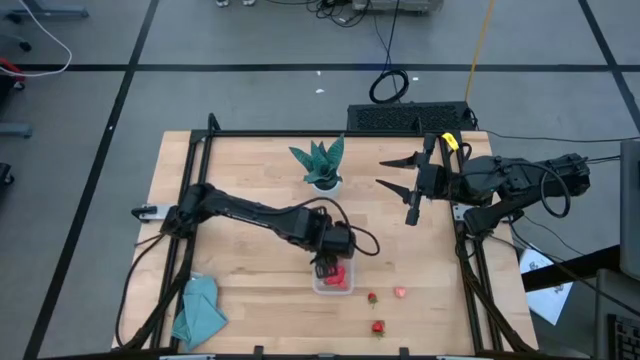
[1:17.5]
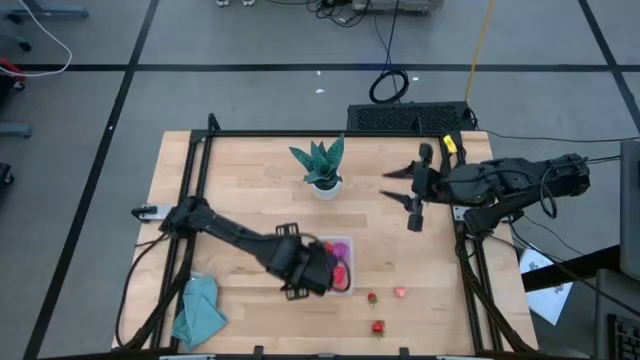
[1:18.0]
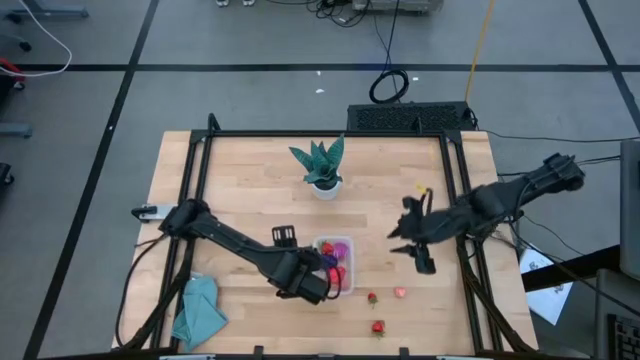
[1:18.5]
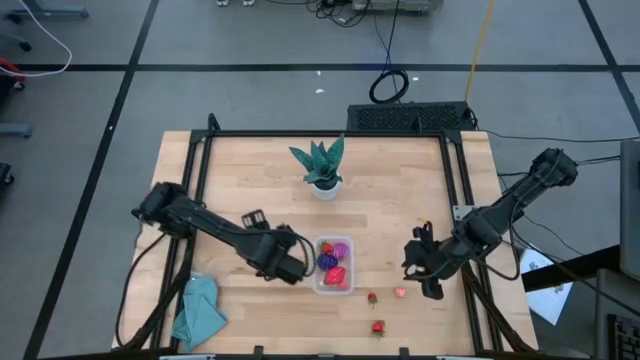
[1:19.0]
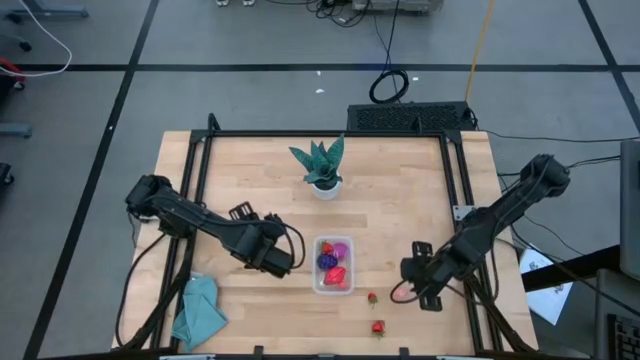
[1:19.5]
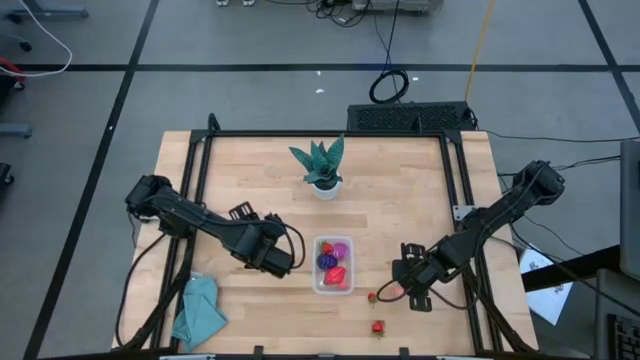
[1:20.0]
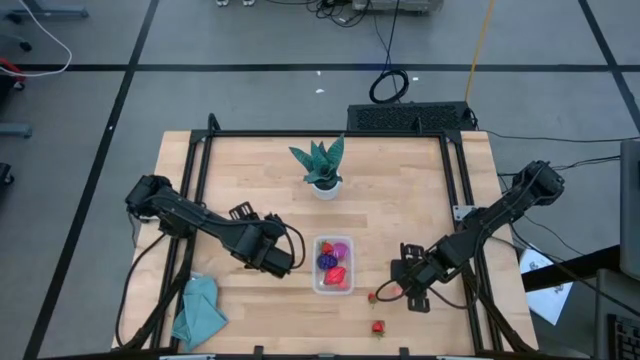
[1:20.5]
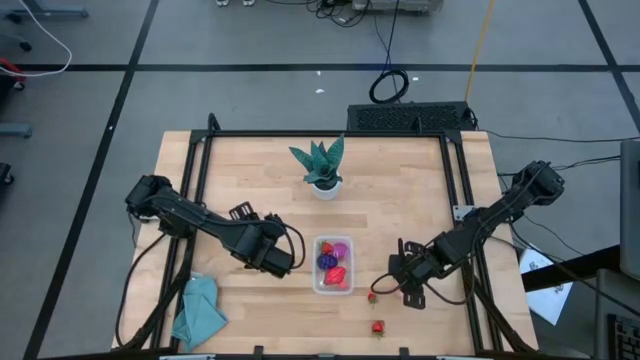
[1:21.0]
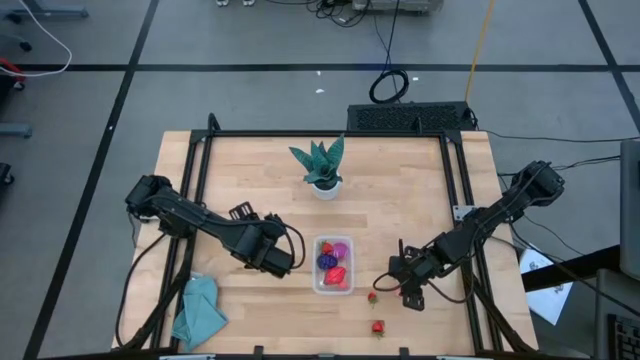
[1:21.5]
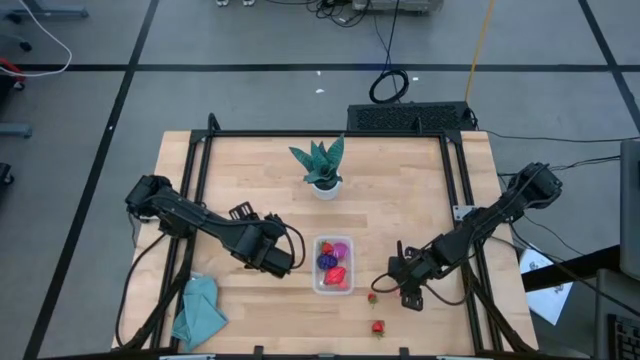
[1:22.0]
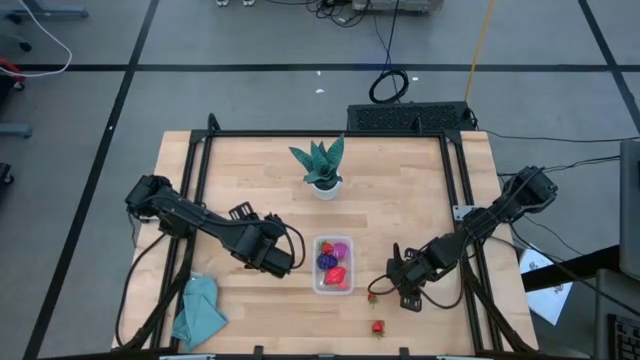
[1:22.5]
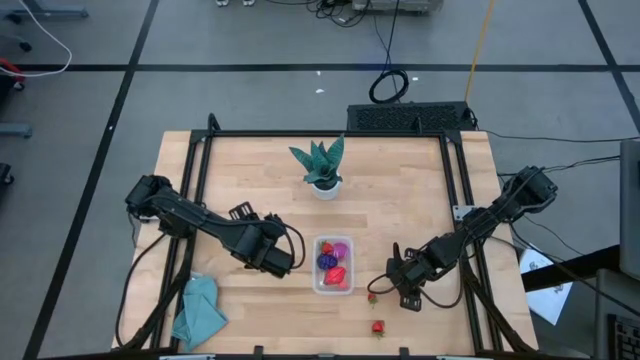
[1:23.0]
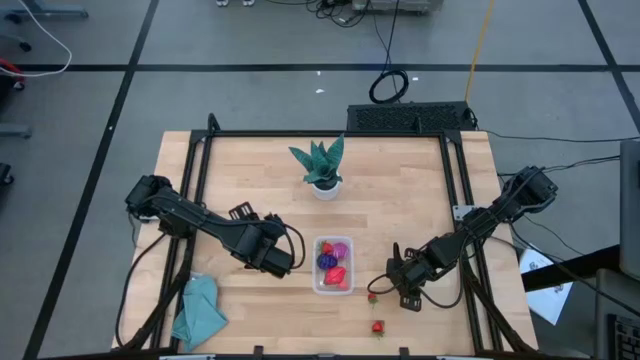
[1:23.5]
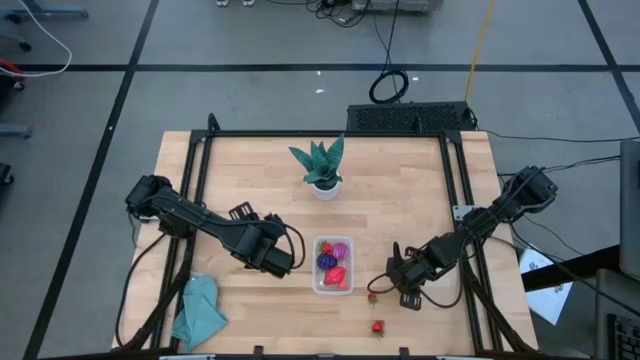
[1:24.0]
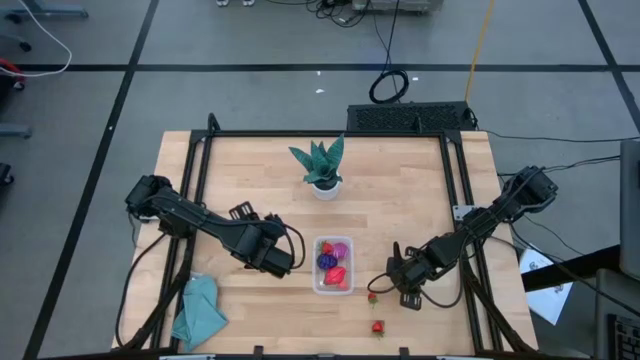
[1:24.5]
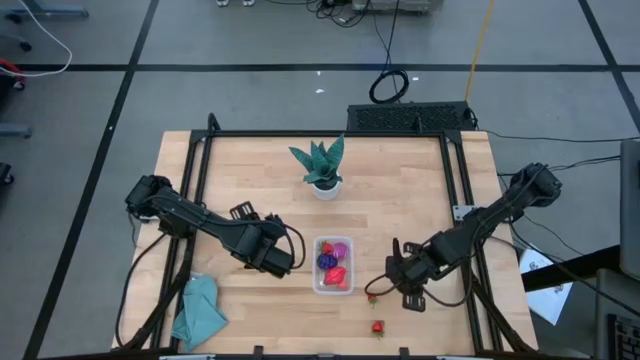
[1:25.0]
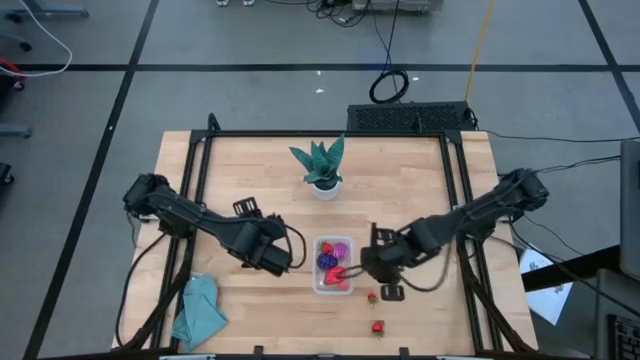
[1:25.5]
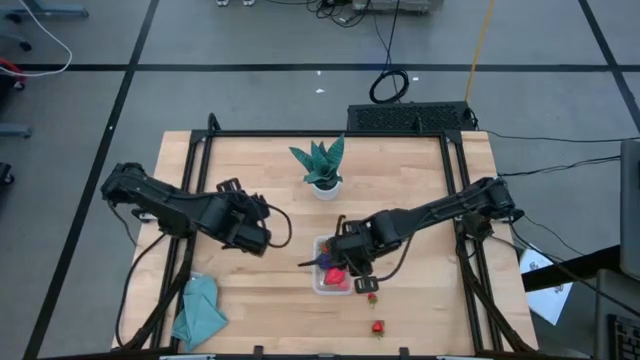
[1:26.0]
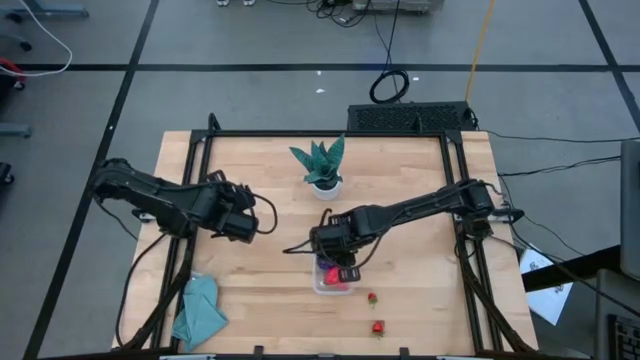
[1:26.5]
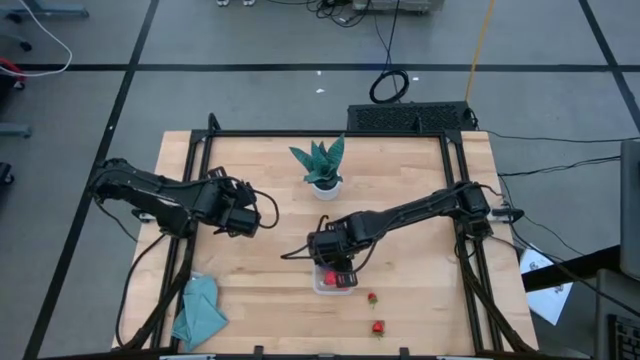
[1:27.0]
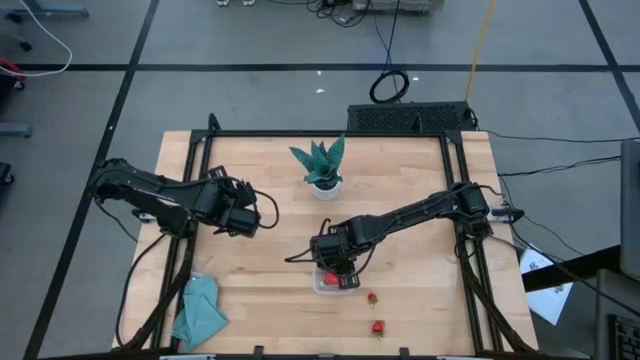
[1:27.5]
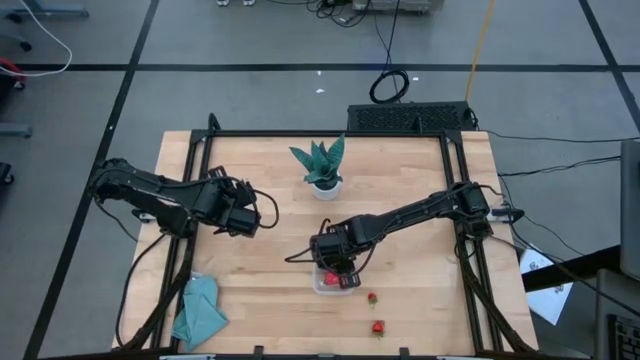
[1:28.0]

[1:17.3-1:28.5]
Task: Pick and placing Produce into tupperware
Put the pink peach into the transparent bin

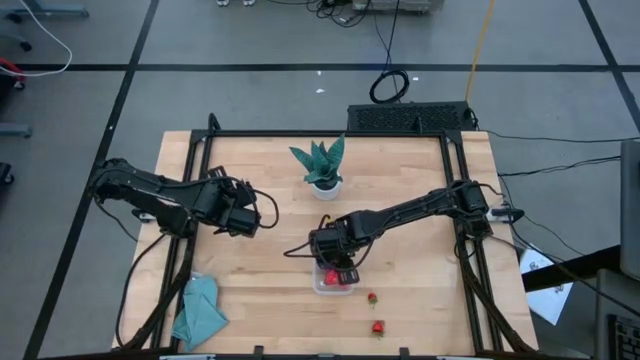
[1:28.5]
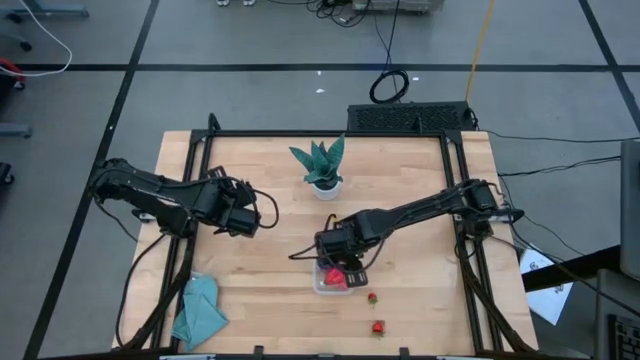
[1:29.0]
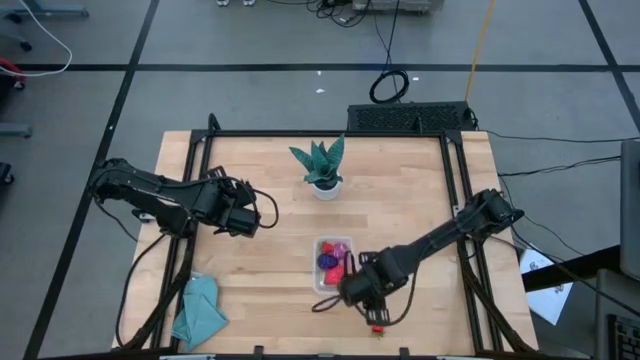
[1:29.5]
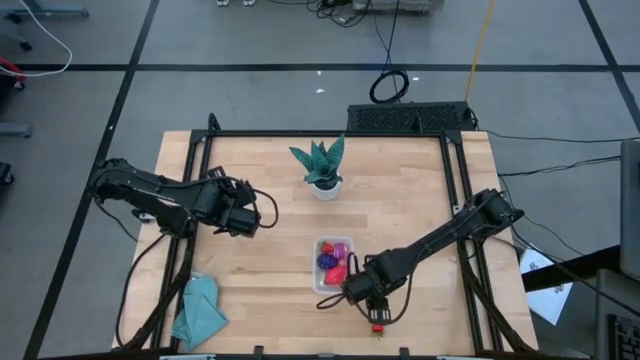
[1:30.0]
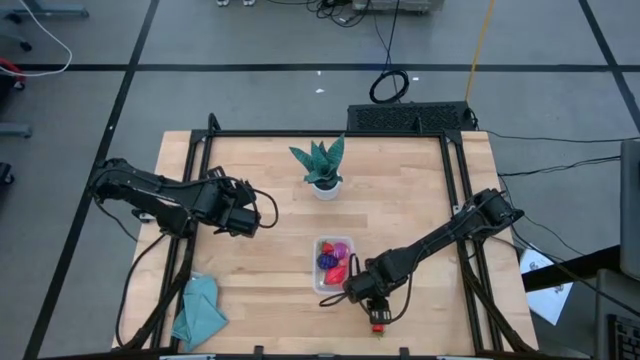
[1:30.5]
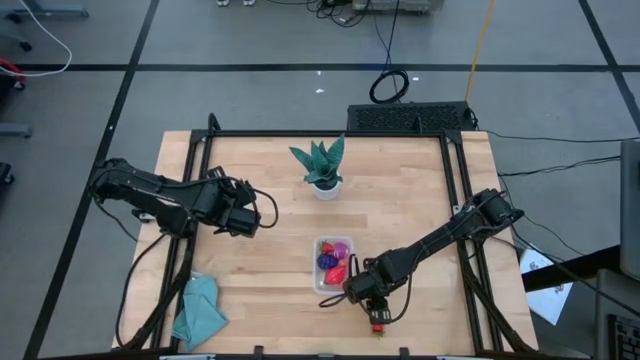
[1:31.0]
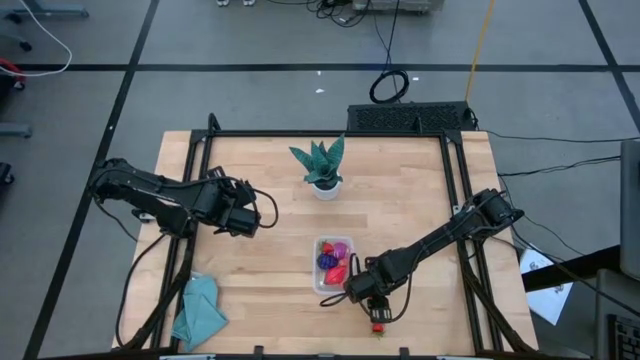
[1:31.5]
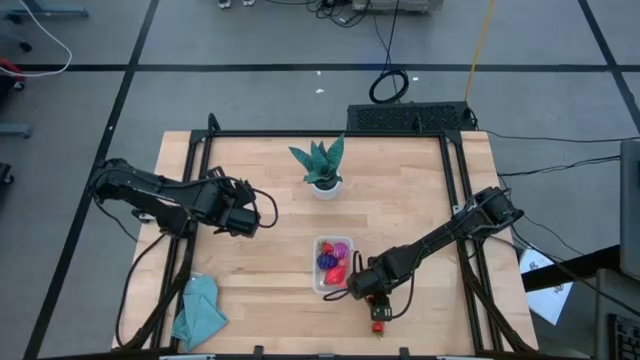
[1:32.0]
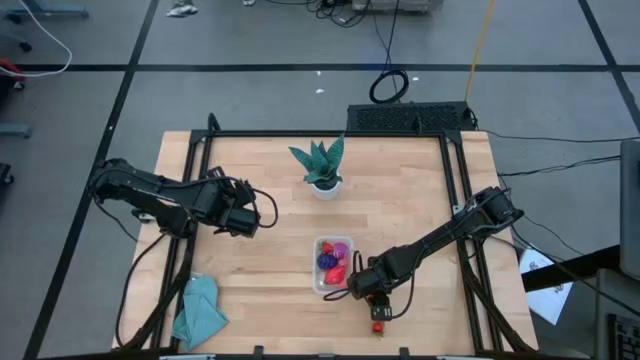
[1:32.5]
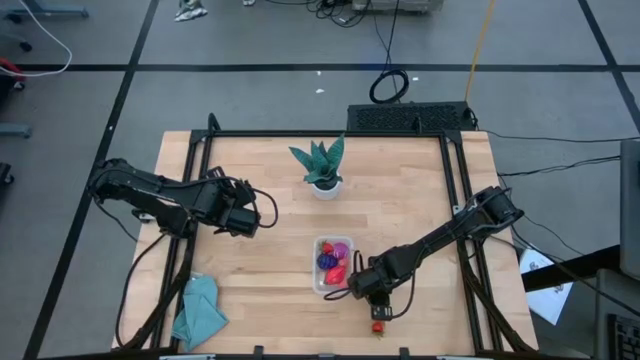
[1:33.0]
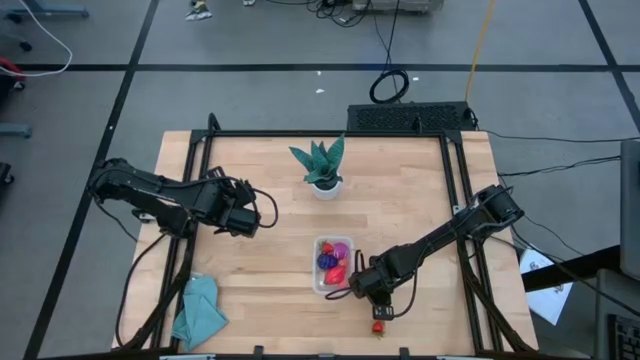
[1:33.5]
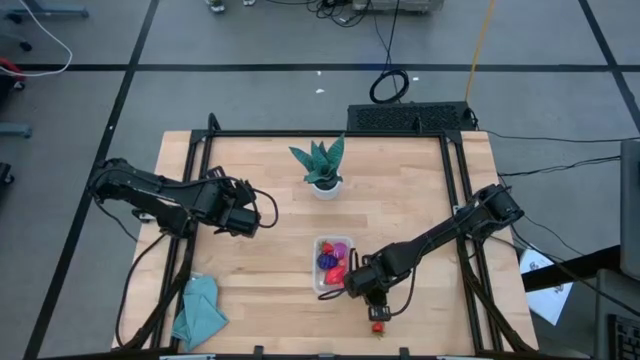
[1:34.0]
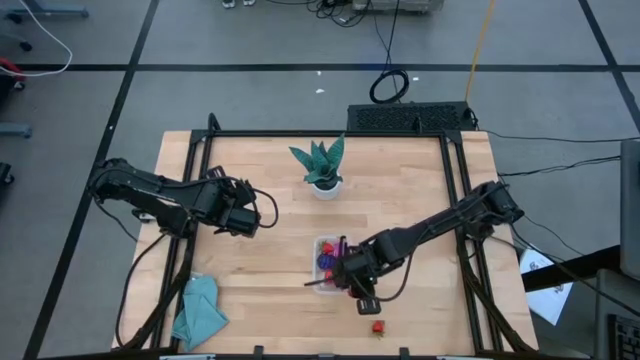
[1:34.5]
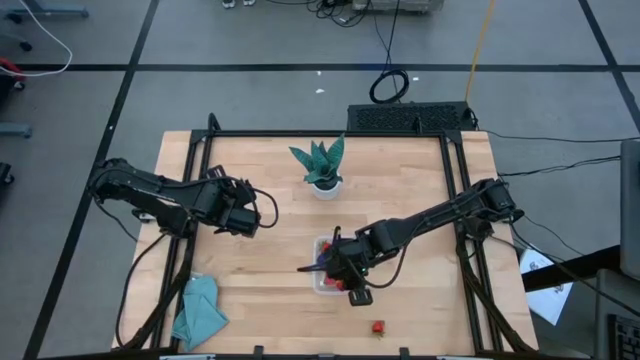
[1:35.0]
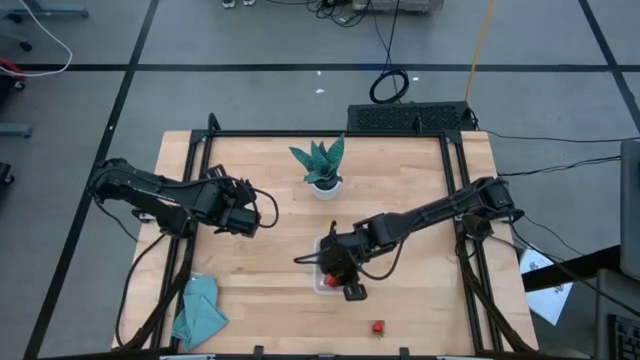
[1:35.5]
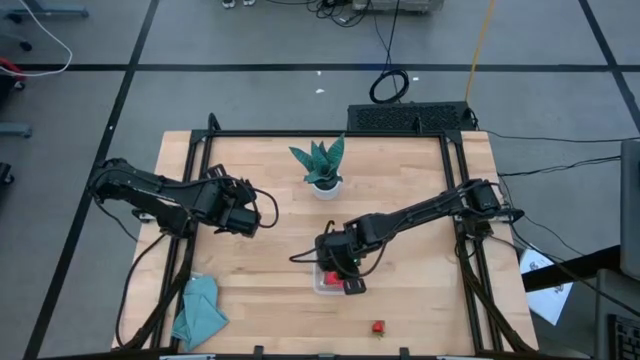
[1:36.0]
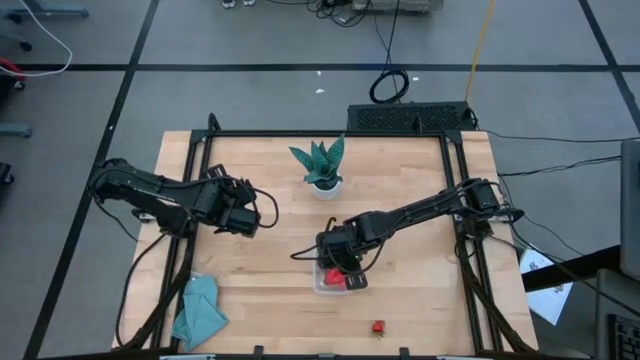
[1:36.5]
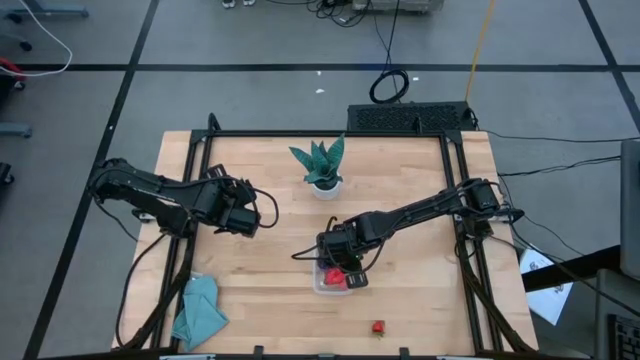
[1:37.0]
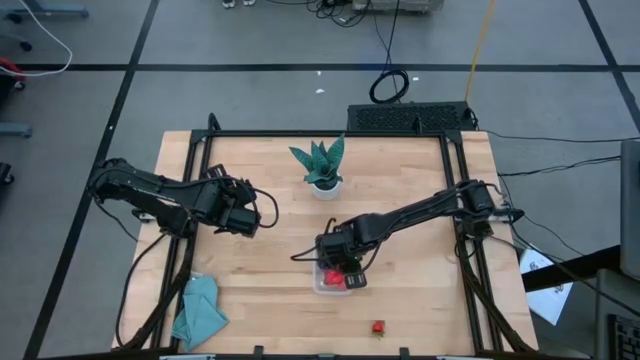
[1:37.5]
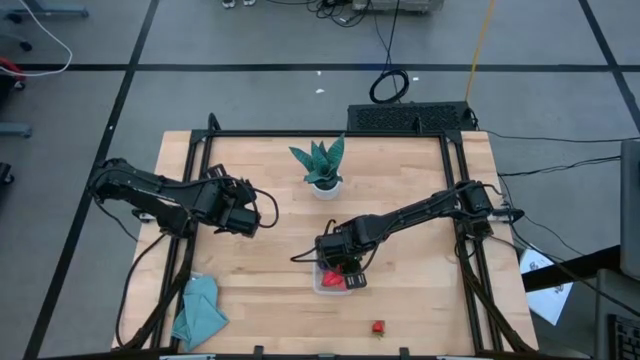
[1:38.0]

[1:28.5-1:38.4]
Put the top red strawberry into the transparent bin
